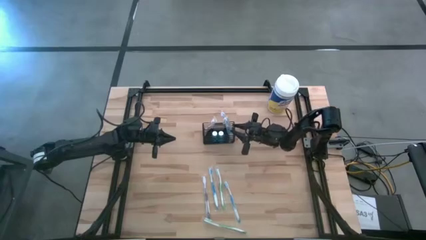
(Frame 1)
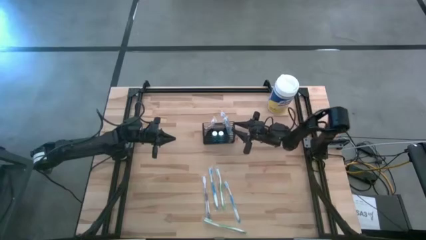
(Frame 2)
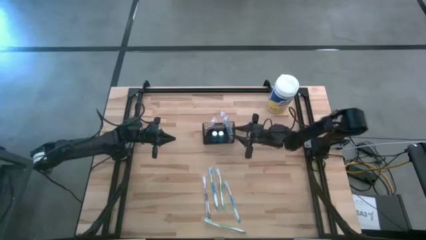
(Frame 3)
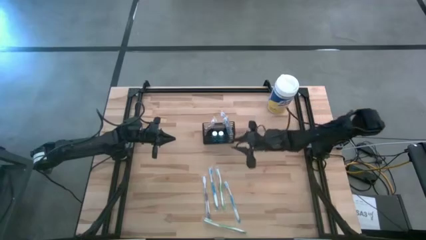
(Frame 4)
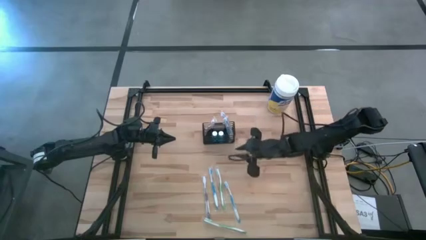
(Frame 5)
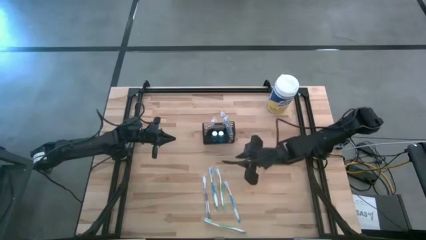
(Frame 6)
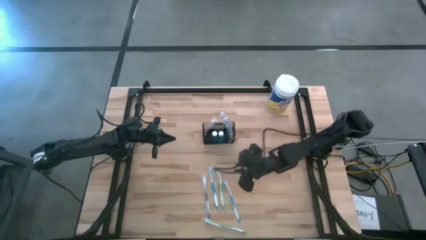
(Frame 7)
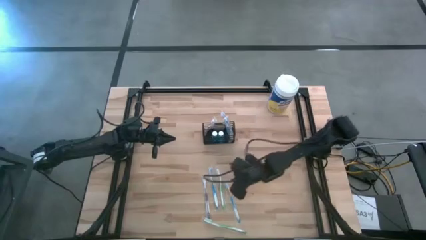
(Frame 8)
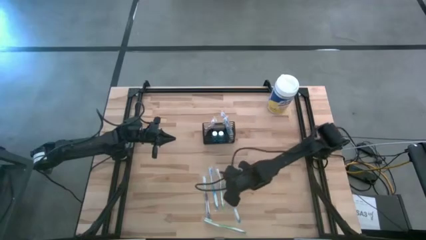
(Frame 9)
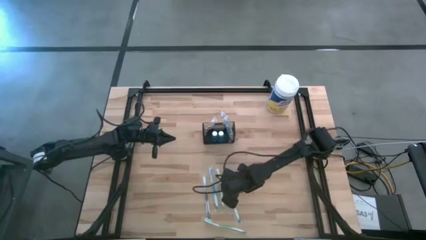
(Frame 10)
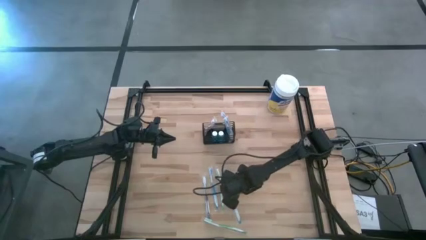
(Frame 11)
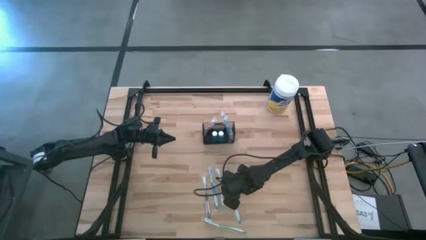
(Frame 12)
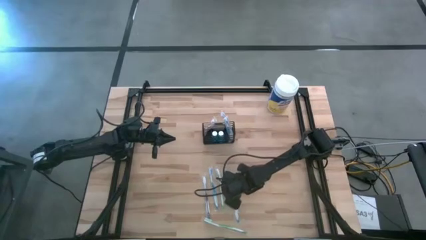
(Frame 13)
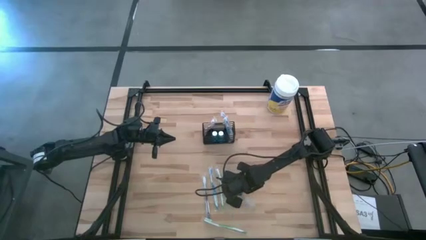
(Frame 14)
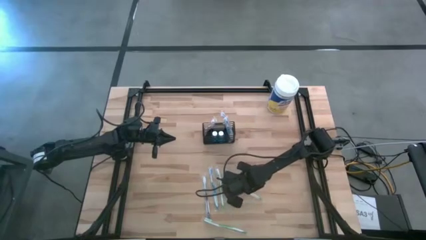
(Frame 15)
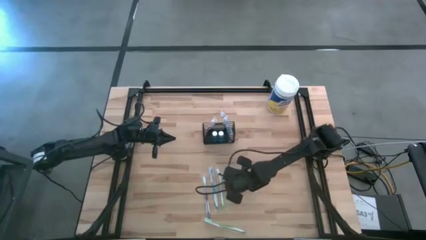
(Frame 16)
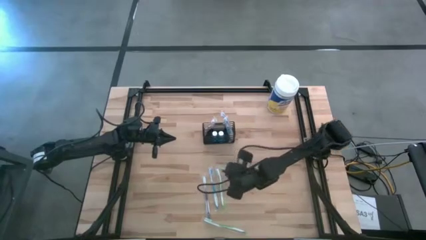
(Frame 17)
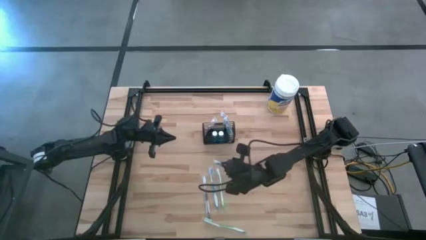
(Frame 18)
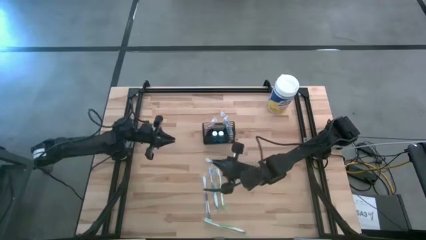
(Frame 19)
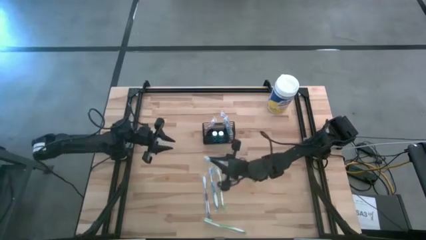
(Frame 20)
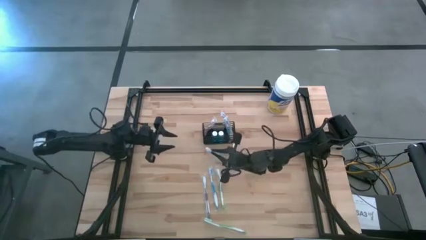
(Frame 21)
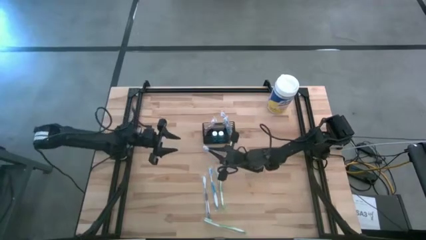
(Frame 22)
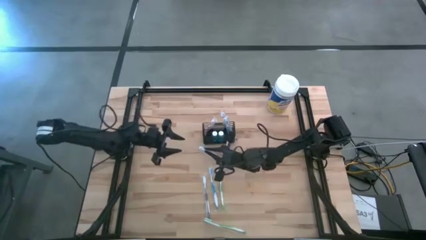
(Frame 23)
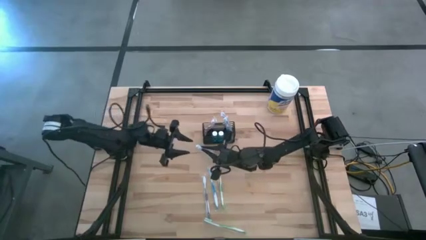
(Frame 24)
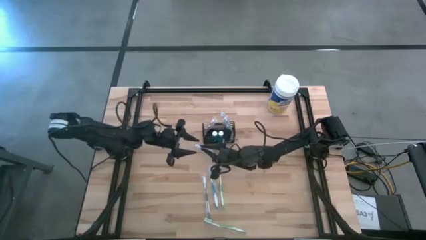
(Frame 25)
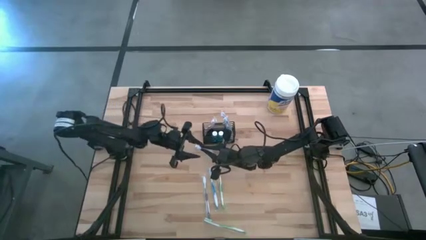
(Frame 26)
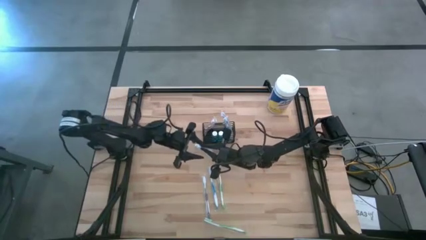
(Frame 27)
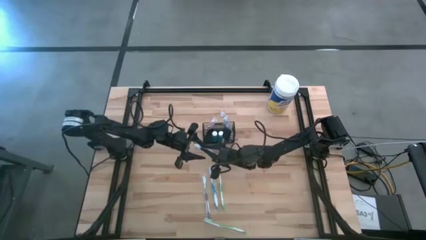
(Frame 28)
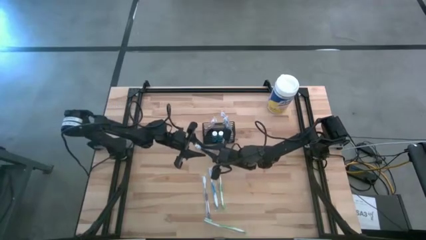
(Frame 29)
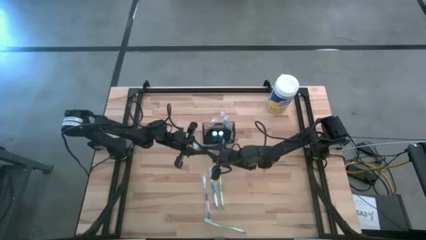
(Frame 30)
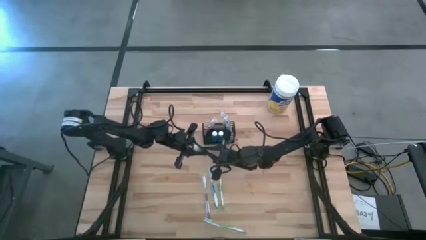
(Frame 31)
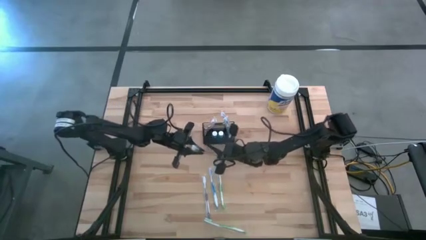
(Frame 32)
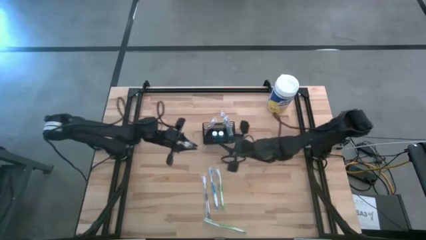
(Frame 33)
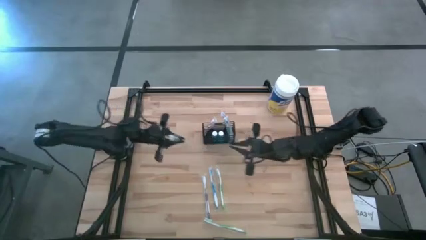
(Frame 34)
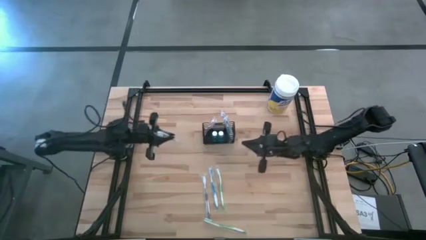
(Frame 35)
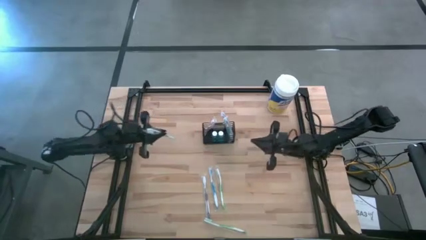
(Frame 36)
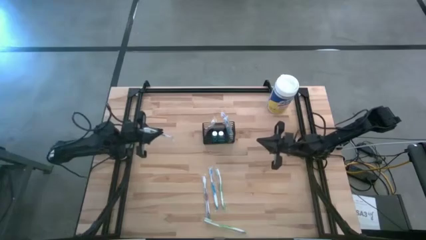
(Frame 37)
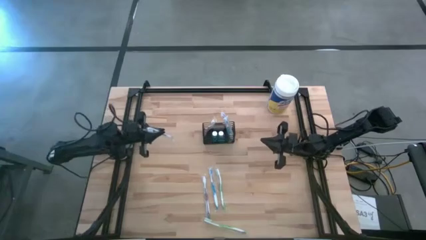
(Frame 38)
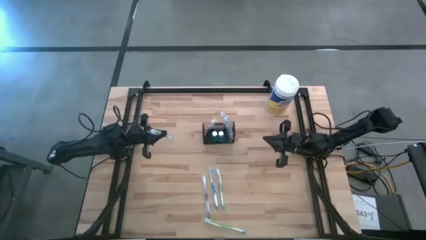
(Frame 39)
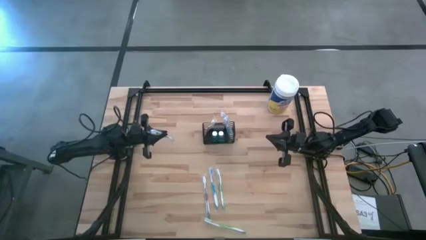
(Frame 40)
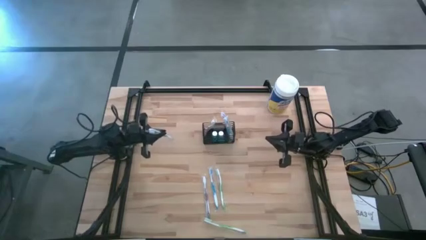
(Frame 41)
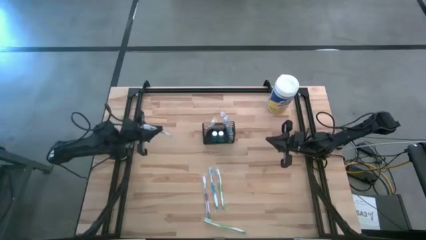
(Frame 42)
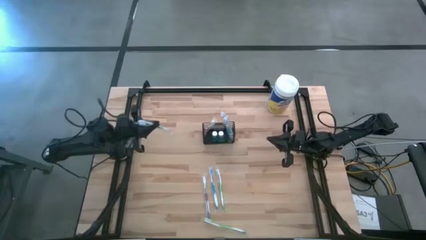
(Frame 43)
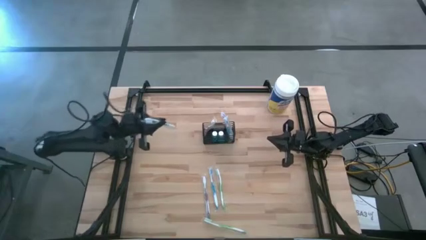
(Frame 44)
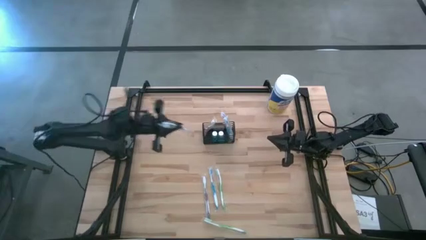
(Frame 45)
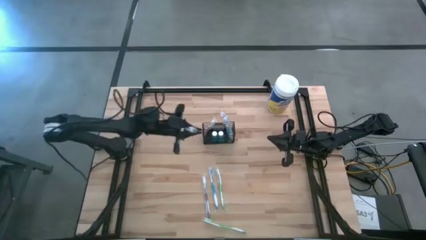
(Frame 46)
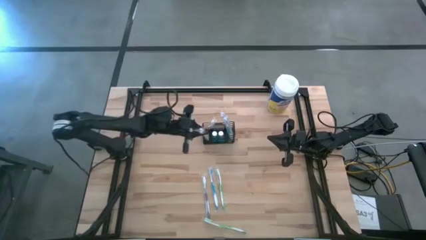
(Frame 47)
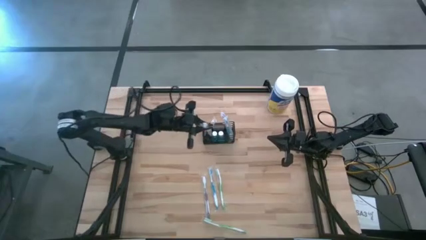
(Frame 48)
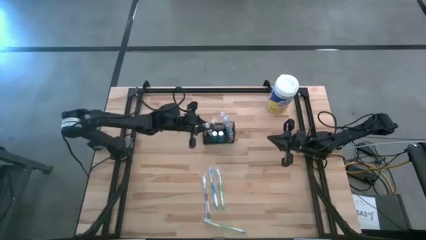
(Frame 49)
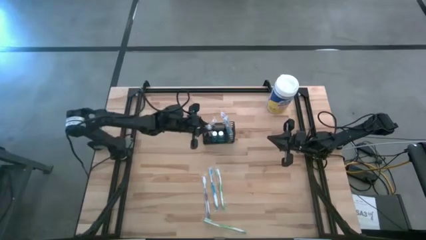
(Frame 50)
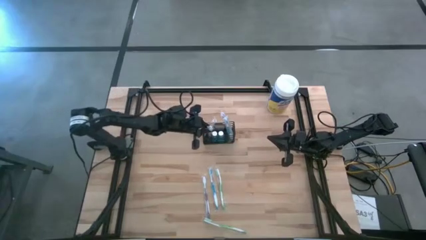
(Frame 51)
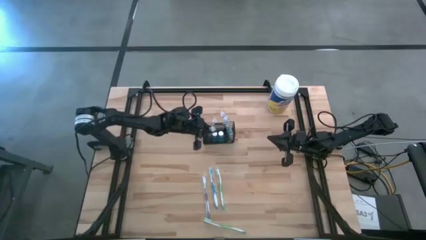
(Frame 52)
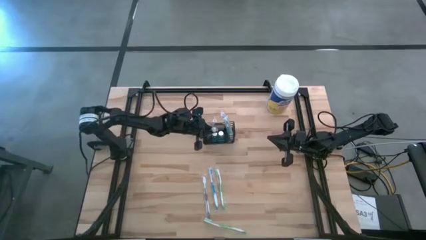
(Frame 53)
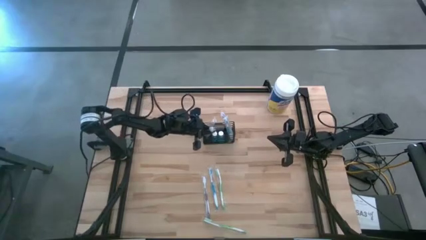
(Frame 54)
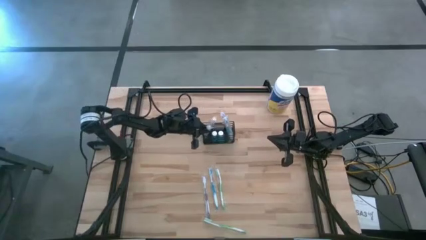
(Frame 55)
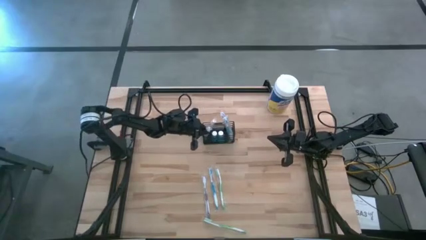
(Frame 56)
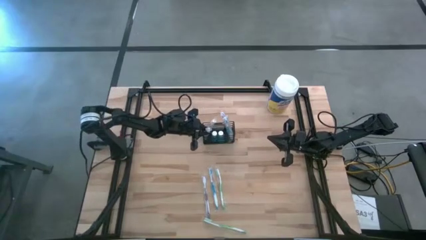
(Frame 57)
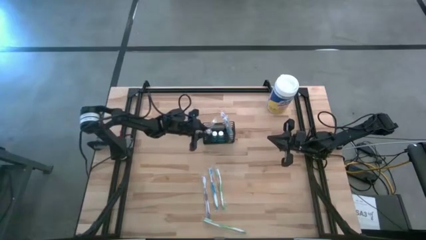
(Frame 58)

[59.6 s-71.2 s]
Task: Pick & Place toothbrushing station
Put the right blue toothbrush into the mesh organizer
